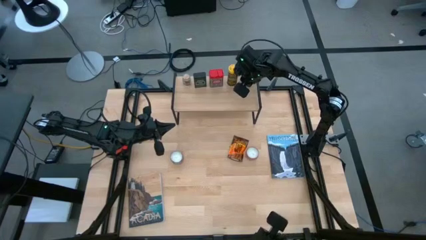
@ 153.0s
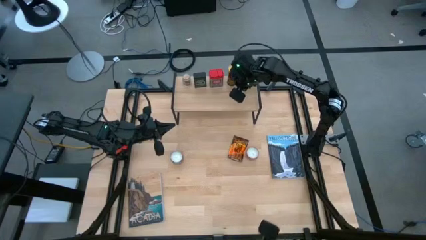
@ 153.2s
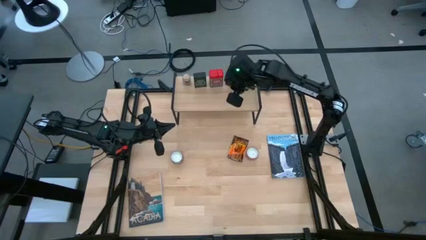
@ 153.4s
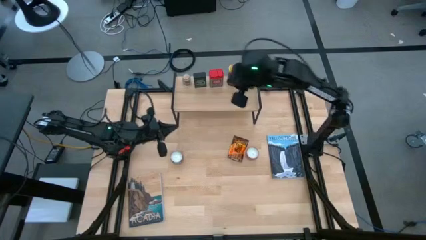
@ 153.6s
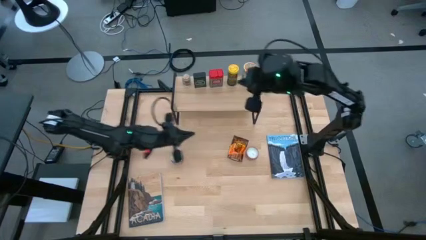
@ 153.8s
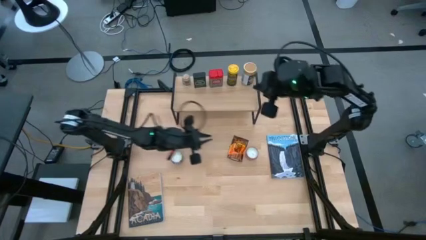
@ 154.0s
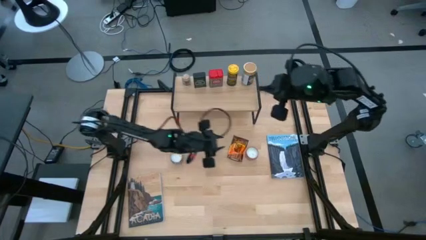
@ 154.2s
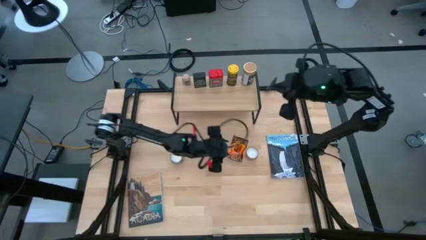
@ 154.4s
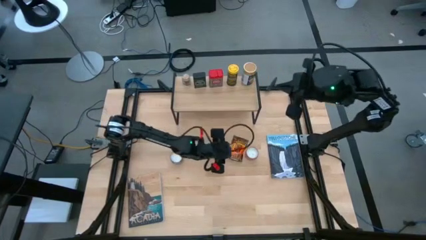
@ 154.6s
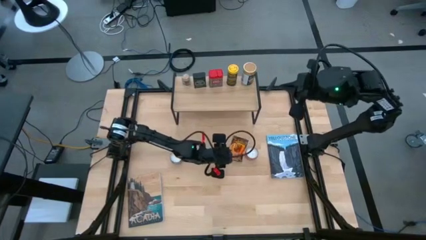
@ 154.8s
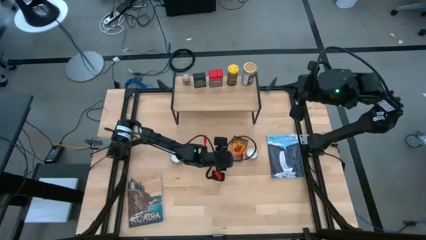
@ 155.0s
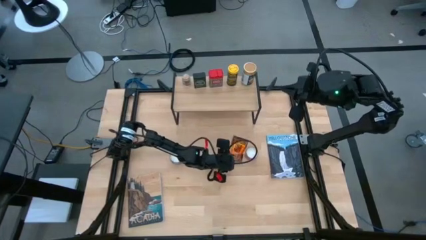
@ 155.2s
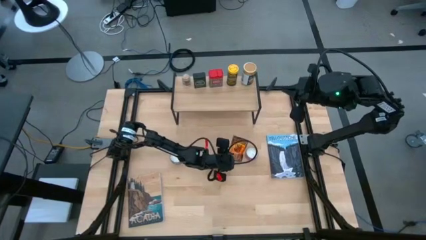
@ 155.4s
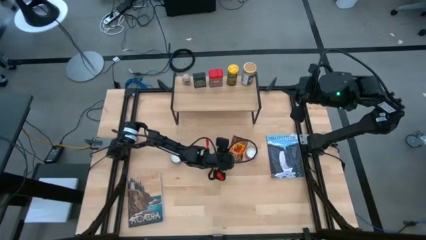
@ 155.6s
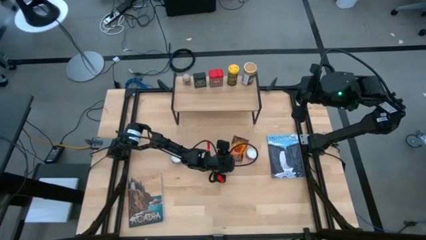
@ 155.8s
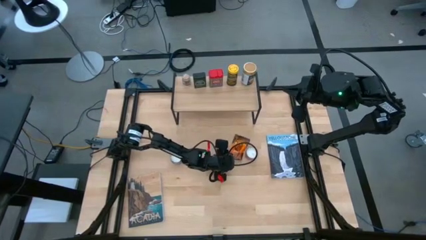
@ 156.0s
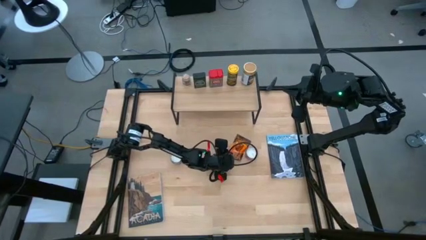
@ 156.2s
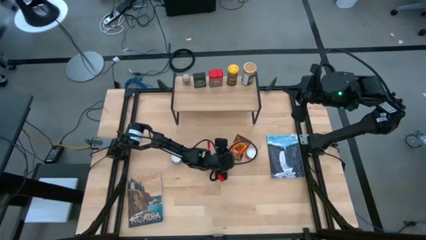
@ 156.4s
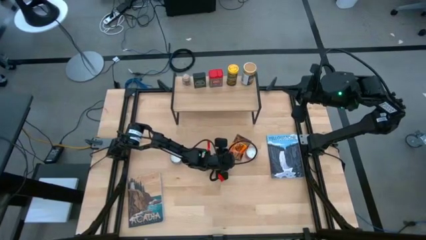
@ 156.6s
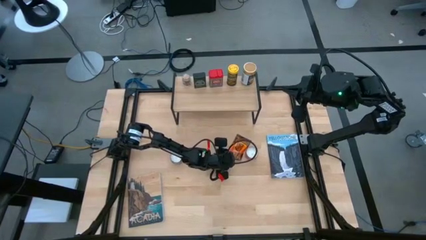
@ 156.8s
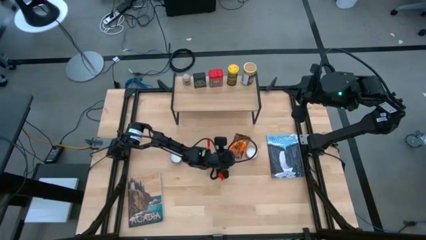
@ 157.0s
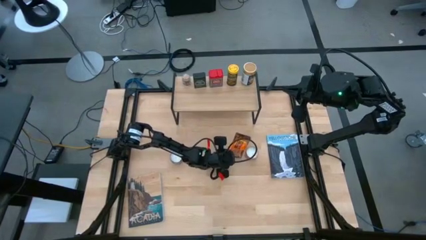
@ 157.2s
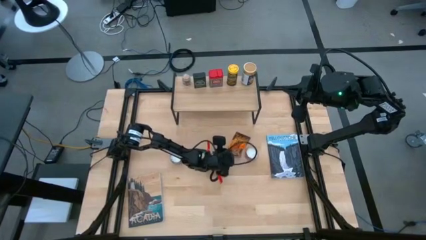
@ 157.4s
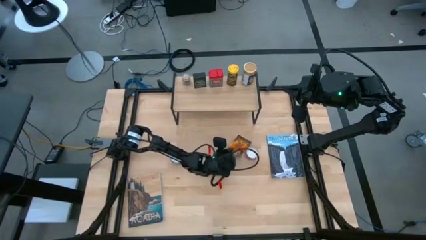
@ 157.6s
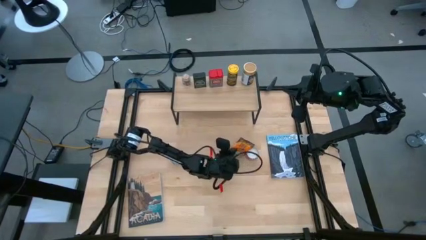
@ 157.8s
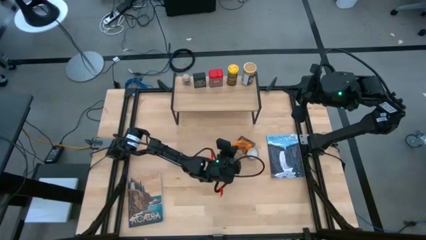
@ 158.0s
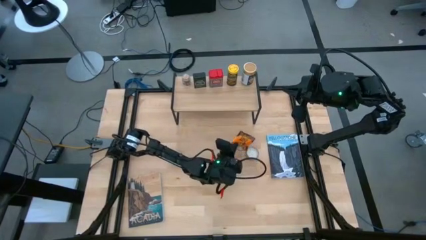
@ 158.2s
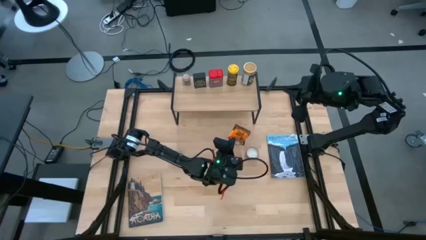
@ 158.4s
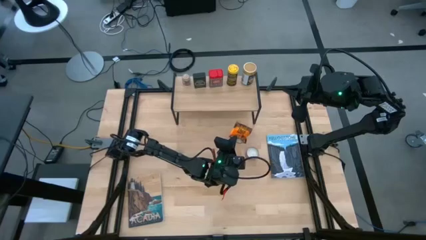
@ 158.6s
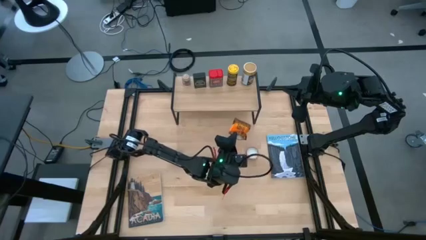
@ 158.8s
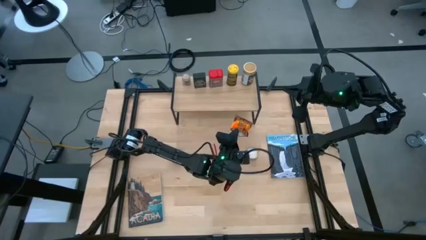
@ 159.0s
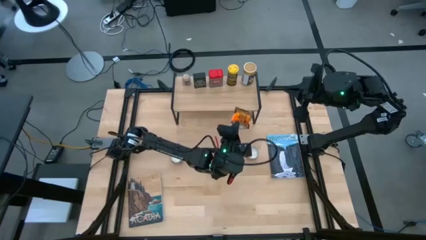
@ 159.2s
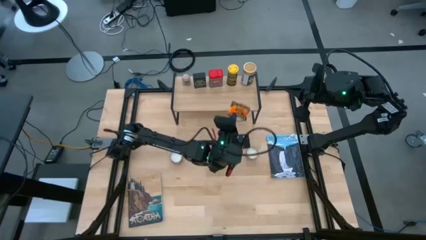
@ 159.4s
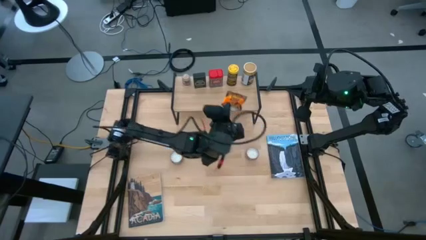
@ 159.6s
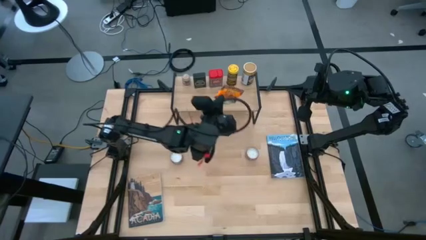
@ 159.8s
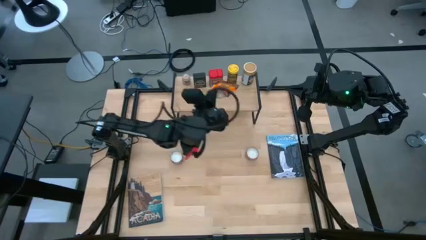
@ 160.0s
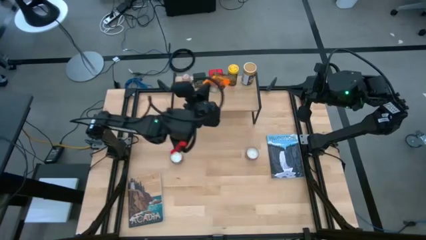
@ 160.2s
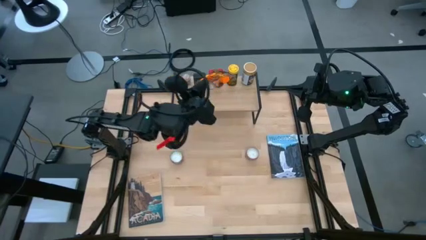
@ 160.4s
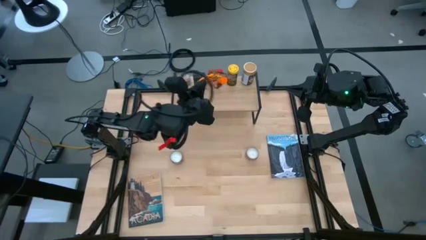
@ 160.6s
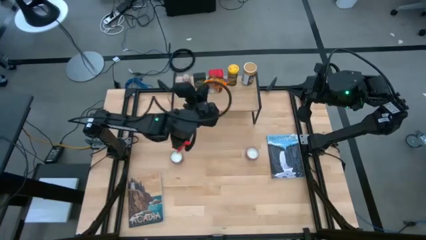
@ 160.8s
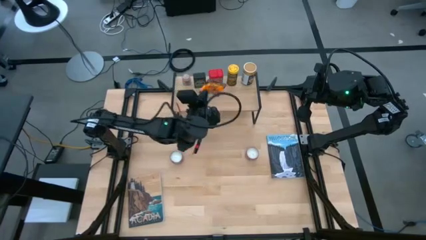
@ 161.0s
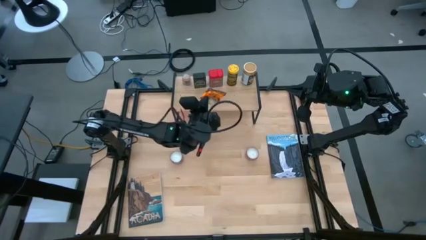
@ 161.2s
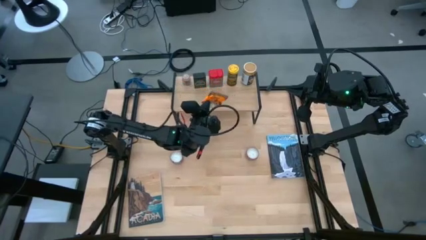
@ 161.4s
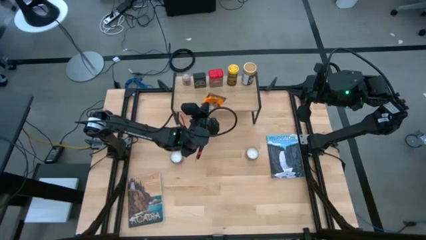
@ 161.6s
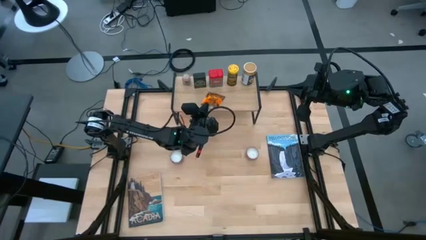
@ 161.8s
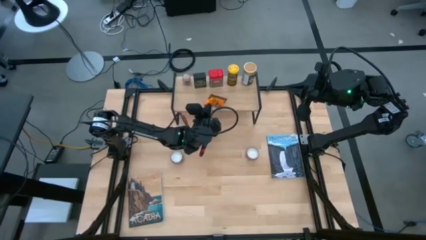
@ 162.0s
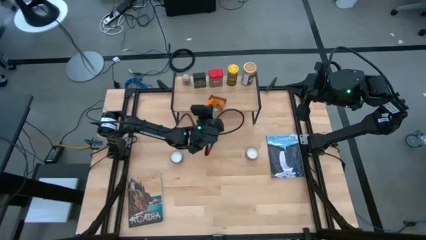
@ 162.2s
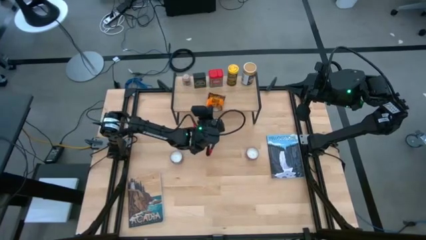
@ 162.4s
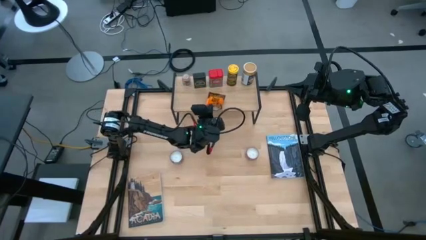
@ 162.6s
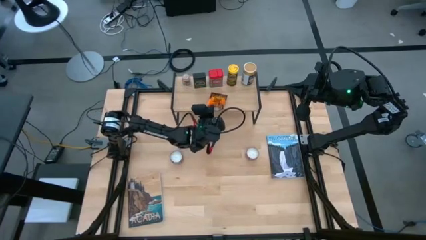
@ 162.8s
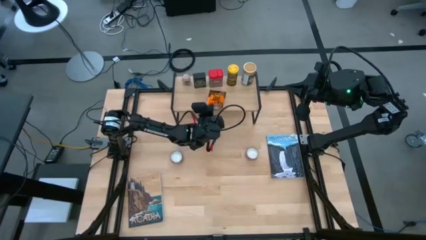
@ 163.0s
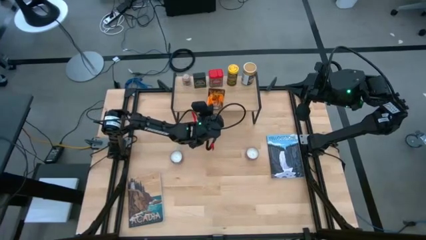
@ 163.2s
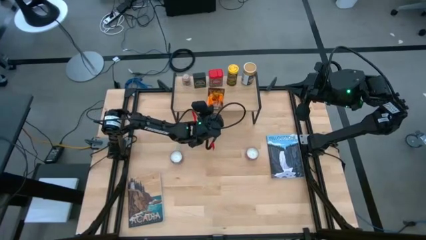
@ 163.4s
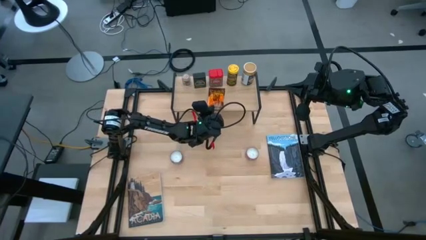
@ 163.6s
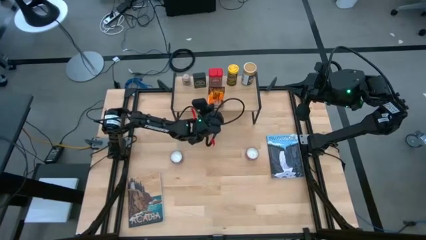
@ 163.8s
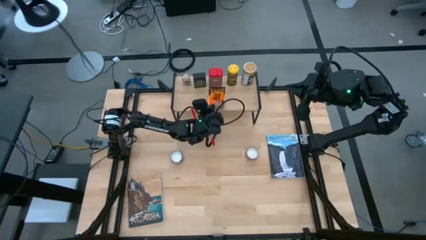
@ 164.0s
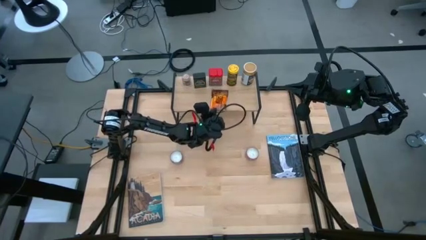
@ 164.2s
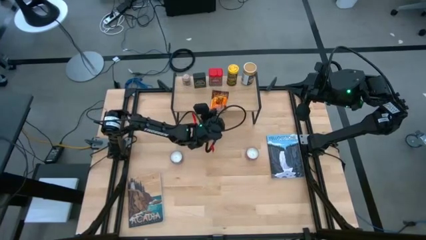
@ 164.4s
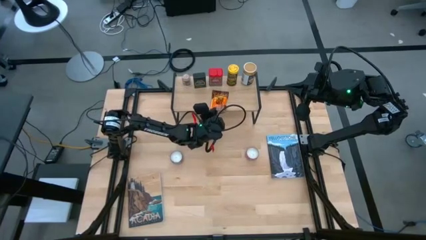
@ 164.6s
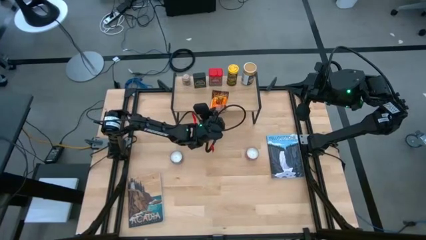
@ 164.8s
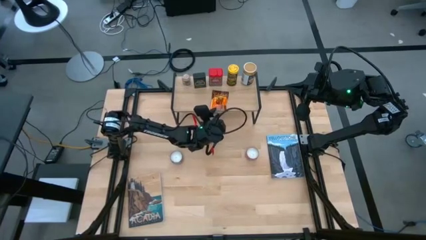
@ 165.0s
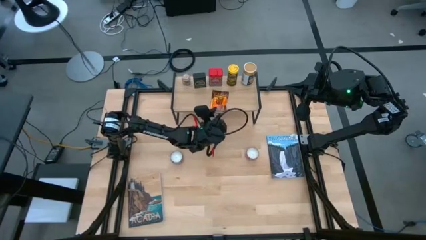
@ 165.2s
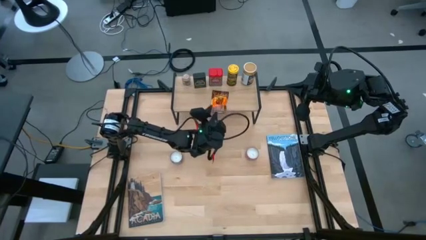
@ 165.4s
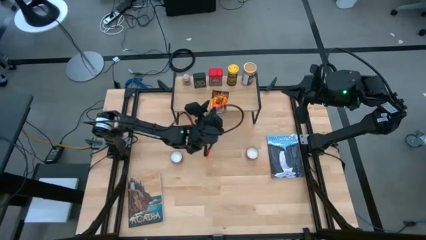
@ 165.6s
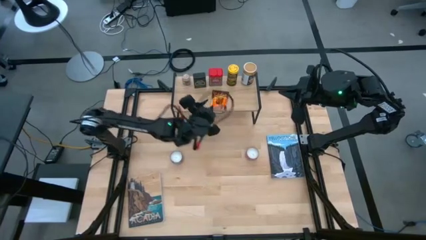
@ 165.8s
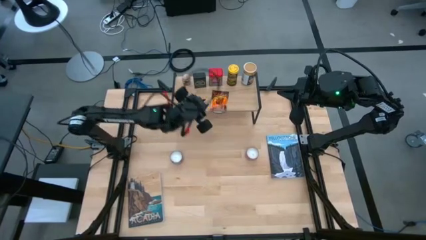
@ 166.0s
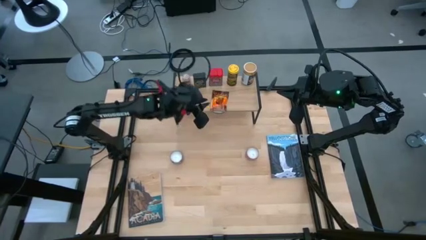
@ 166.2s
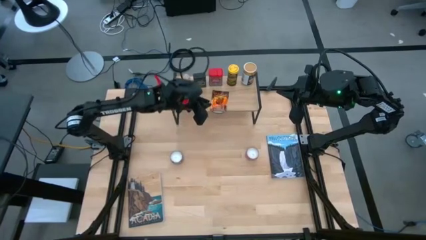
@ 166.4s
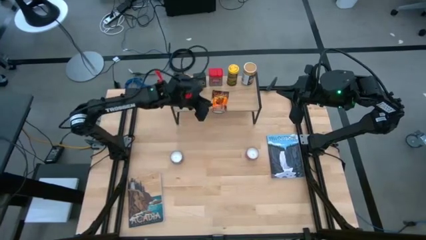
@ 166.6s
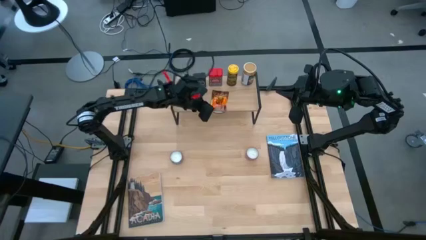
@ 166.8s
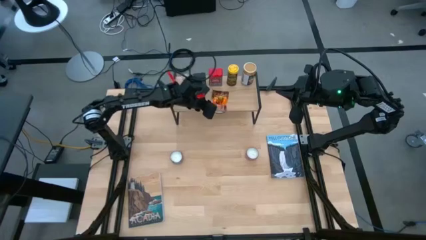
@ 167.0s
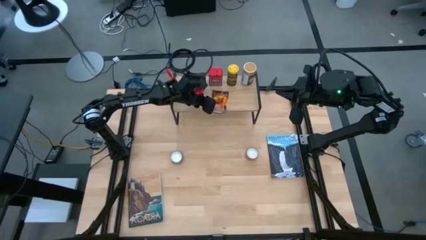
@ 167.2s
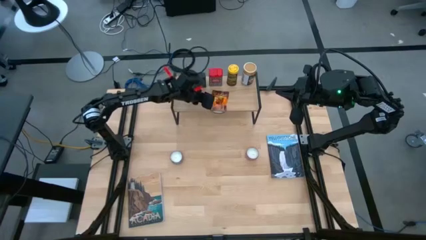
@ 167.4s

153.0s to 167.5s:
Task: Shelf spices
Put the orange seasoning pack on the shelf

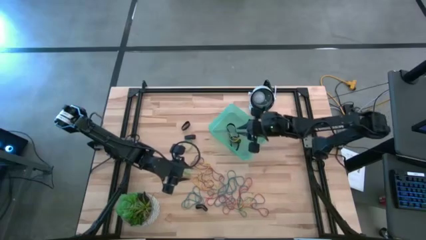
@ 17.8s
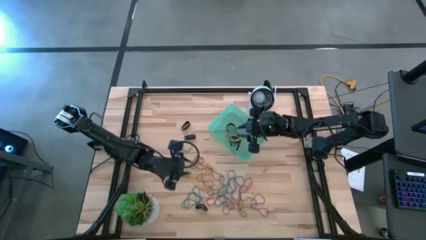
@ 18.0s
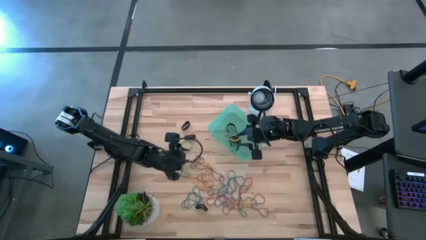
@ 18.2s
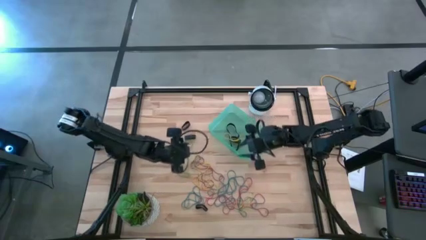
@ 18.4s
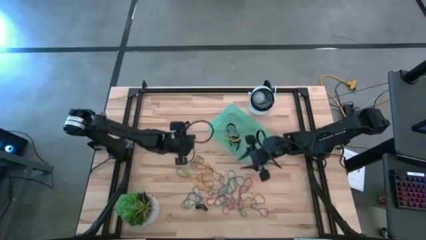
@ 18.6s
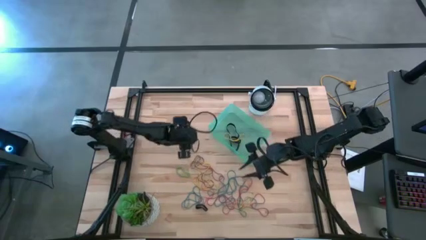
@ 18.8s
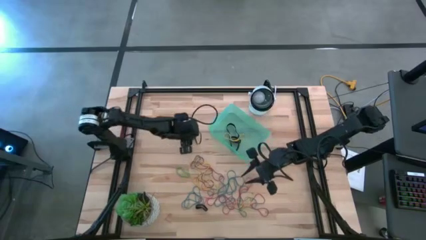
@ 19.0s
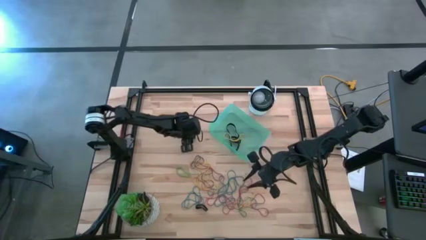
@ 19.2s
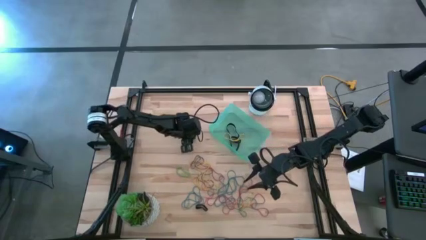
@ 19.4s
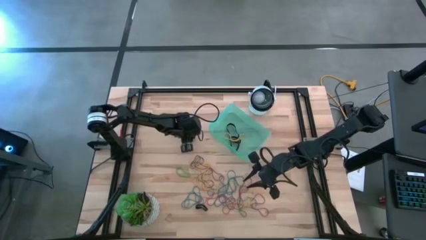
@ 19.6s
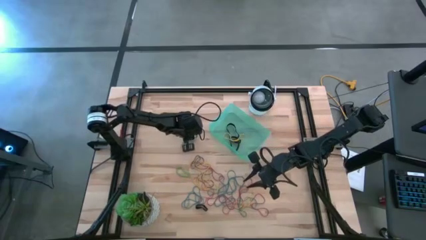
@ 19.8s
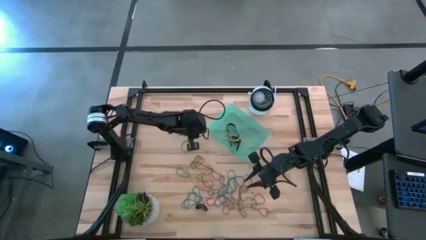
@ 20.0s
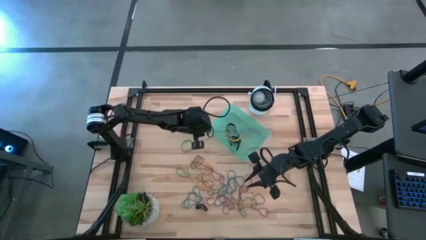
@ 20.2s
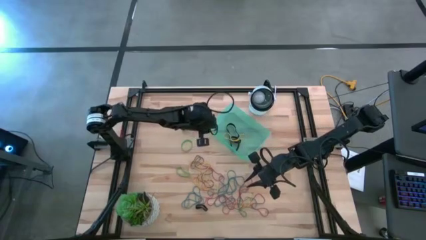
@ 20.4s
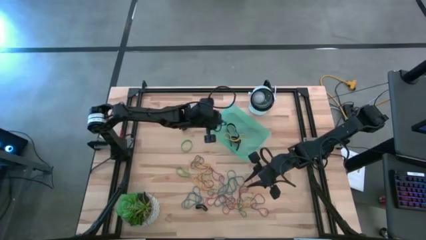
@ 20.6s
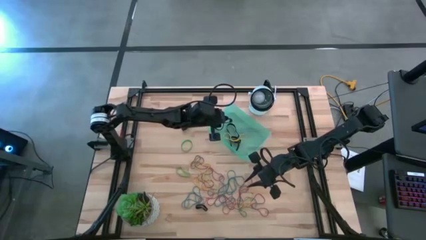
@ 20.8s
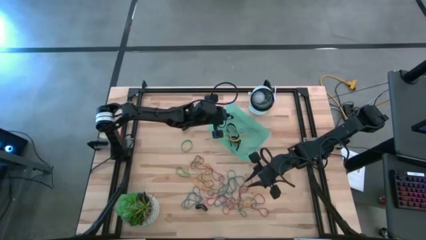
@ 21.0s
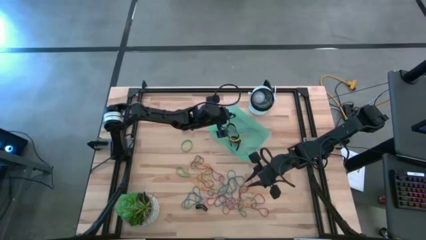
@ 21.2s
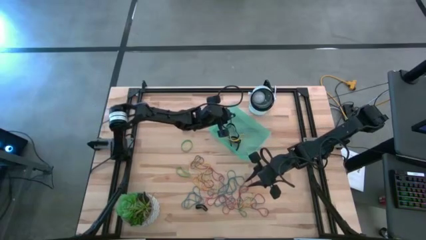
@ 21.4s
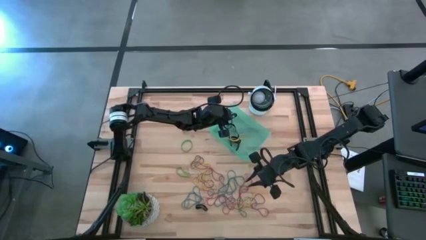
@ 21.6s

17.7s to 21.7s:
Task: Pick and place rubber bands into bin
Put the black rubber band into the blue bin
